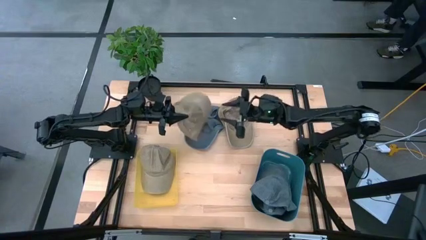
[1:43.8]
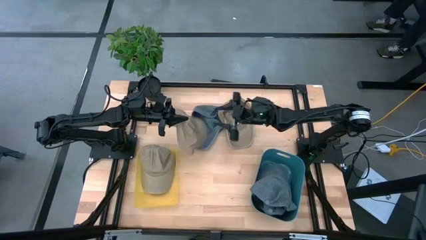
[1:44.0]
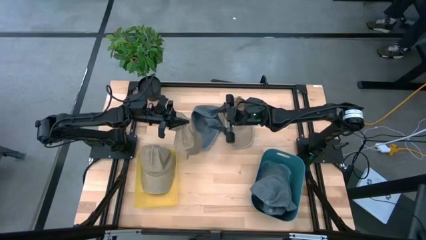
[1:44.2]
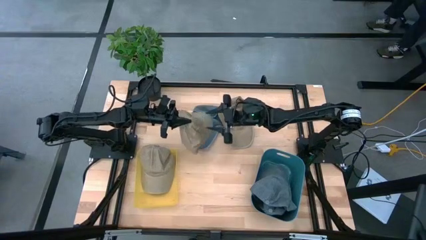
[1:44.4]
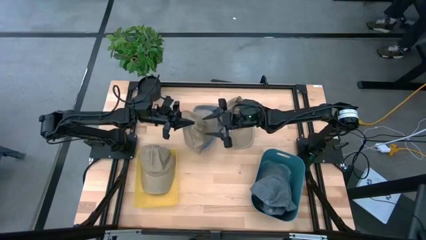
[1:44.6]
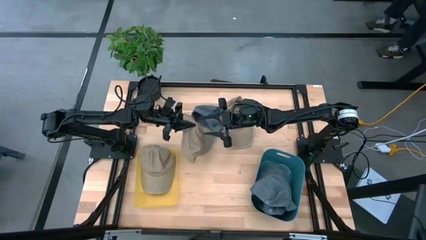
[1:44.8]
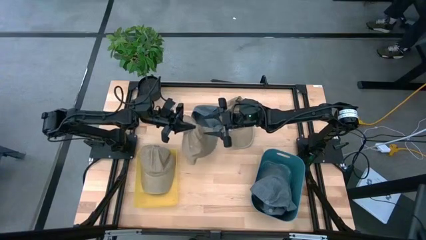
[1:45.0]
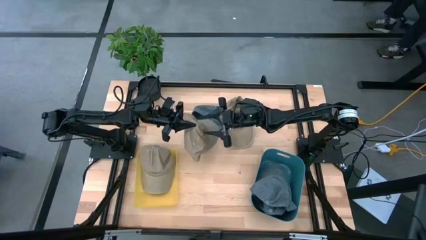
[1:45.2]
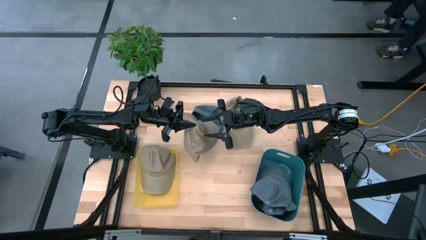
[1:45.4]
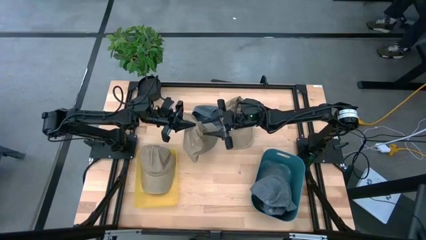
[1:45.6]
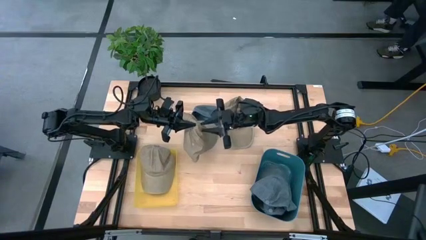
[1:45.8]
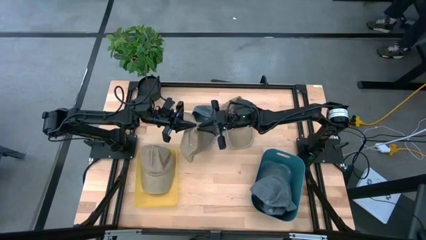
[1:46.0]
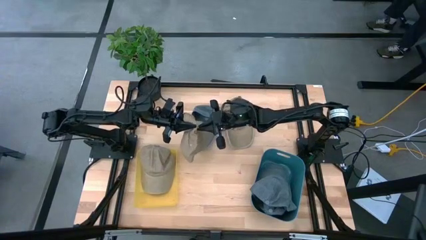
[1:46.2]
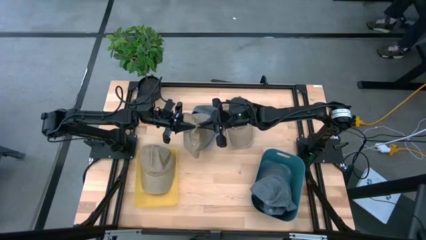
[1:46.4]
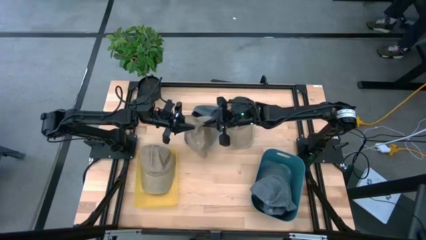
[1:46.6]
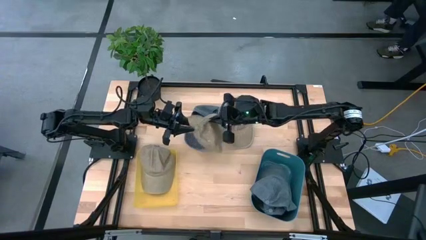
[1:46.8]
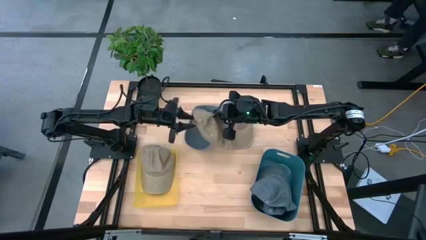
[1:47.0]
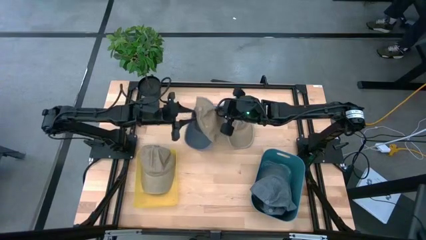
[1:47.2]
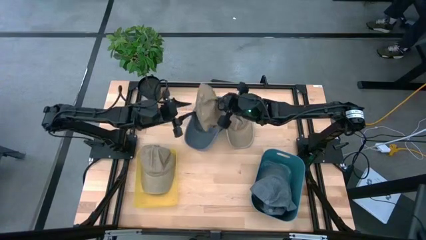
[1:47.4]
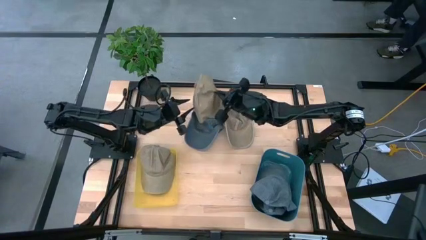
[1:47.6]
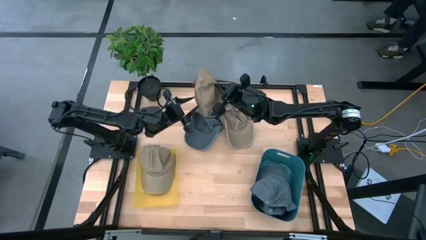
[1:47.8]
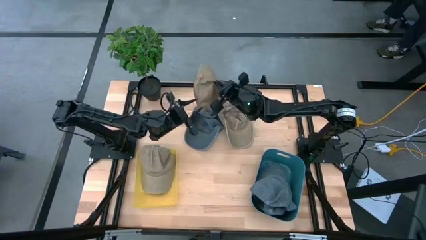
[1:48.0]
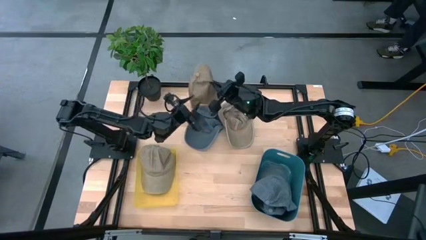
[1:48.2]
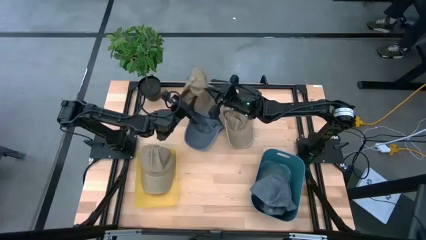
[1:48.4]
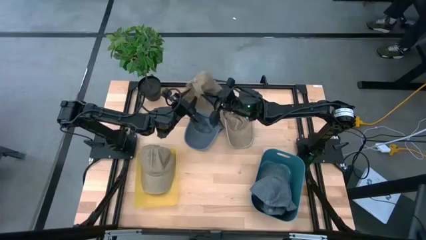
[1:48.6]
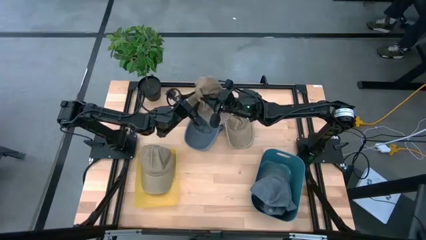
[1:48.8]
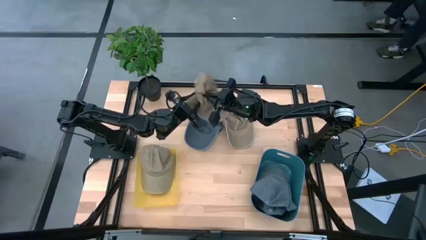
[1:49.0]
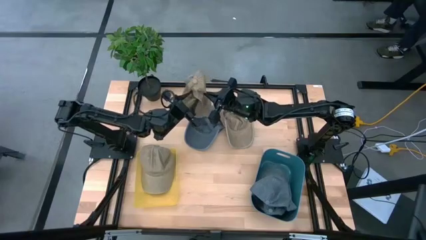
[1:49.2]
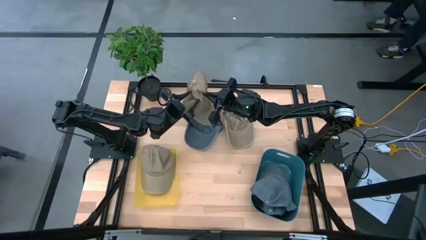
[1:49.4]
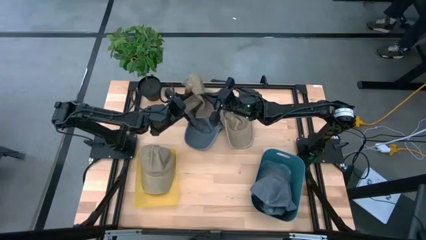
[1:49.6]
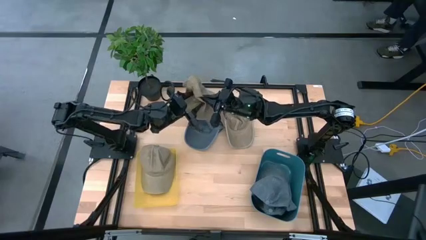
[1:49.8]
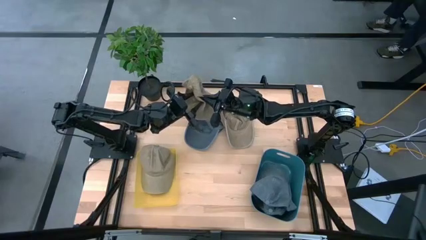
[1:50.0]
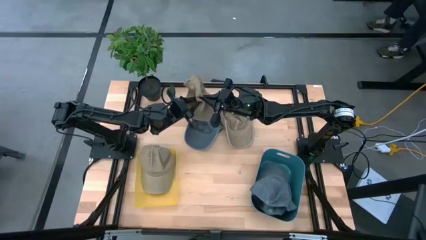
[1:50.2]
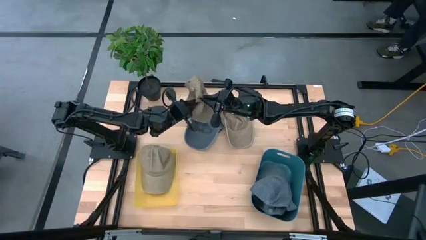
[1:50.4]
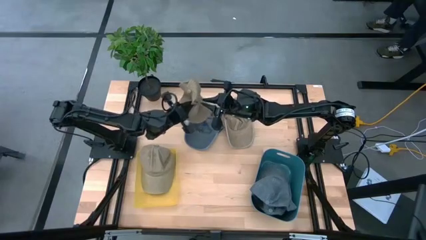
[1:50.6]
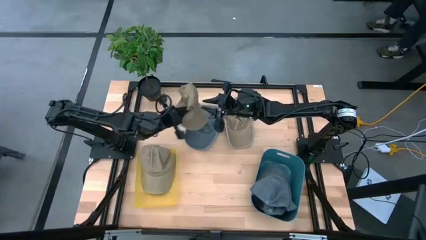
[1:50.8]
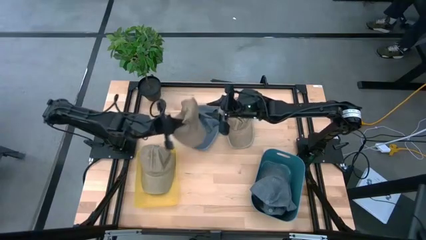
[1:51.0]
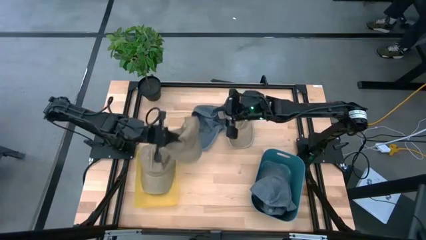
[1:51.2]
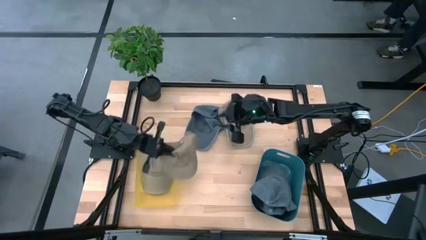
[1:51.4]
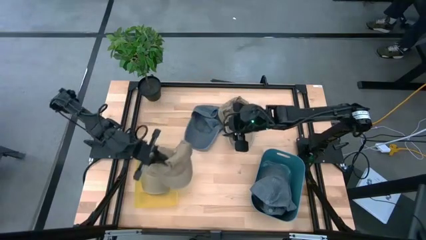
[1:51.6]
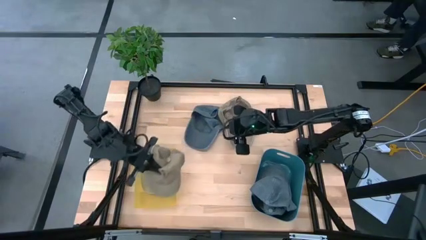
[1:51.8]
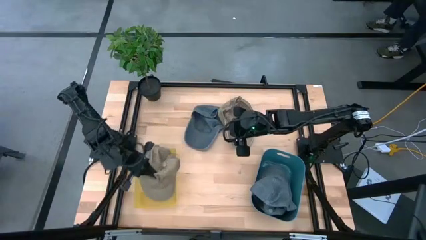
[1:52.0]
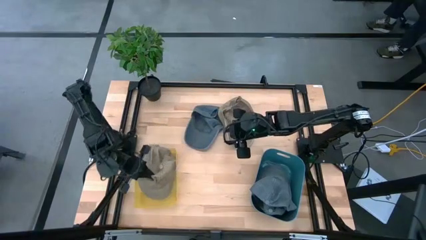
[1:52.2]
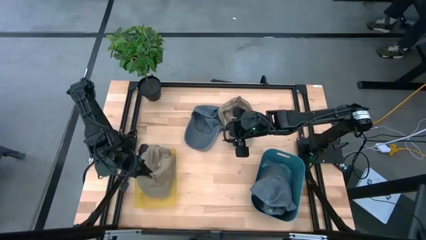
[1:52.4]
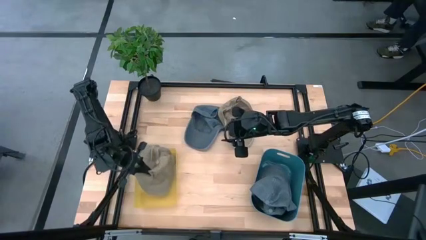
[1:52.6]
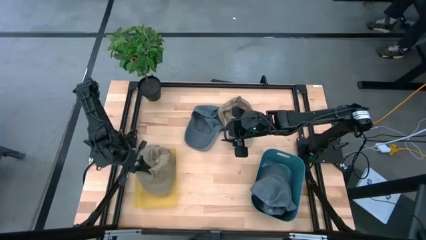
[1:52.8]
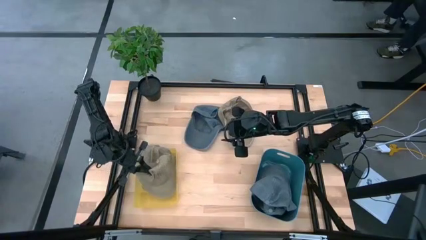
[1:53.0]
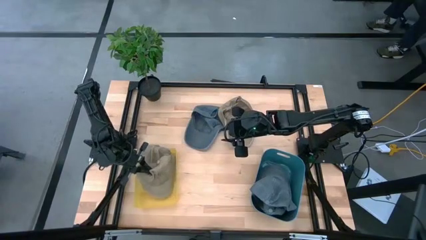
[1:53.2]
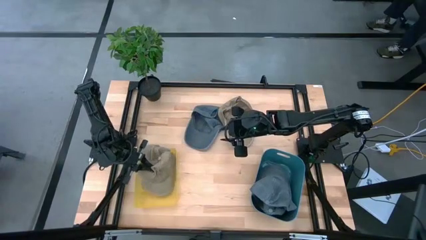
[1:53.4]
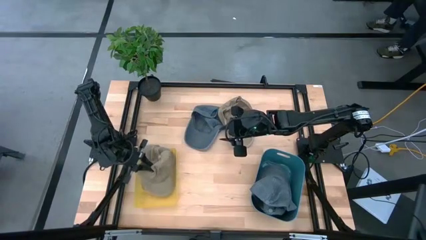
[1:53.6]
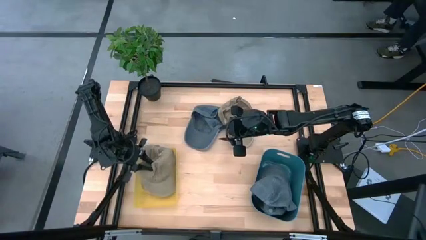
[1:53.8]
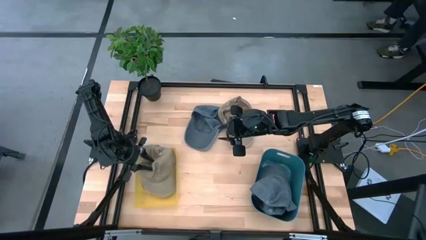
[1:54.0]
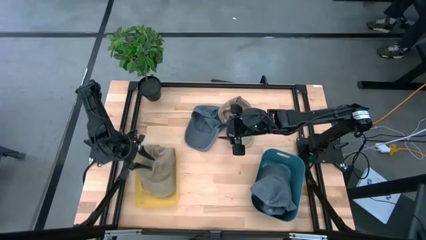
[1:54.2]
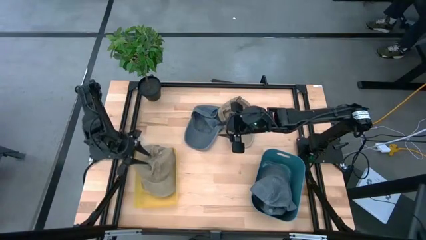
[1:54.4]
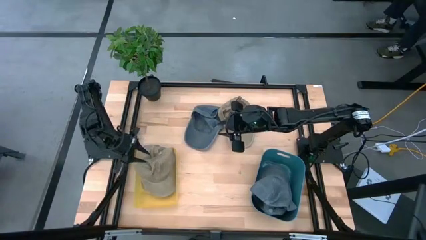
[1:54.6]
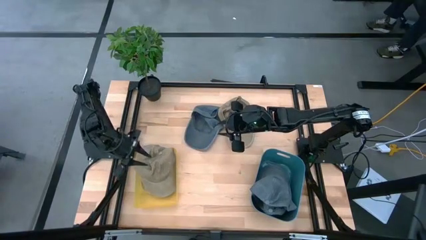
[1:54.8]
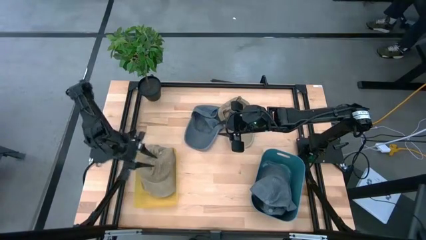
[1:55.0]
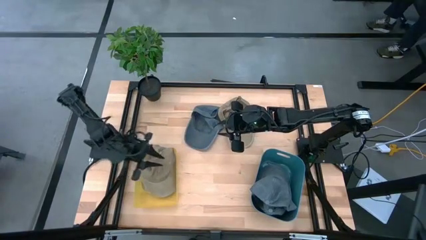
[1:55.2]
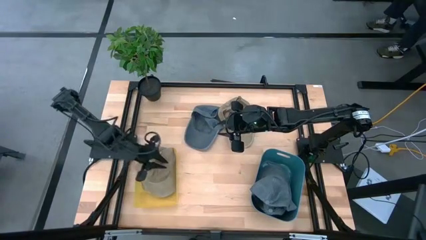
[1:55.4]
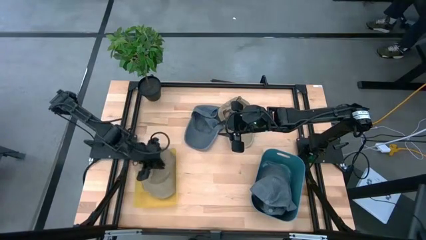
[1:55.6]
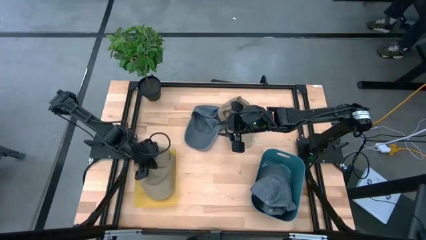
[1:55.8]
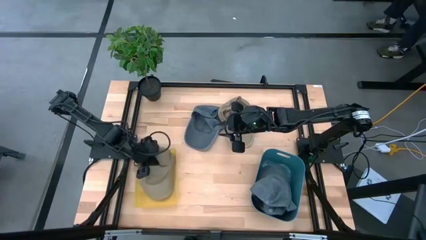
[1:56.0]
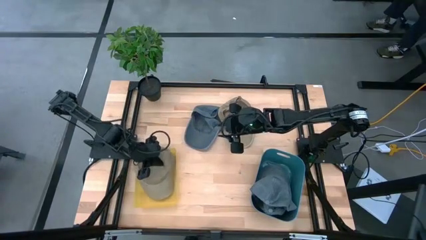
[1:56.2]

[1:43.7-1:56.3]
Task: Pick & Place hat
Put the left brown cap into the yellow bin

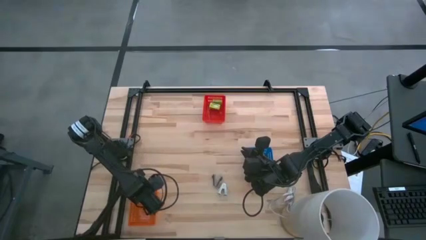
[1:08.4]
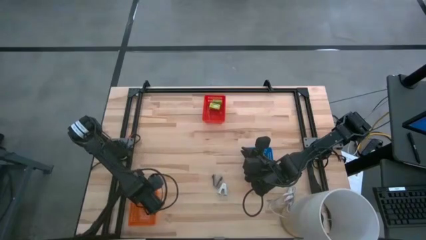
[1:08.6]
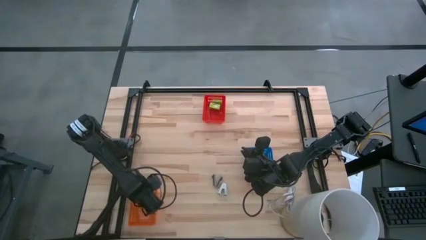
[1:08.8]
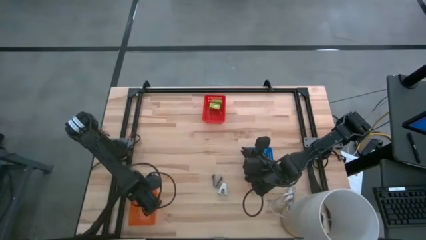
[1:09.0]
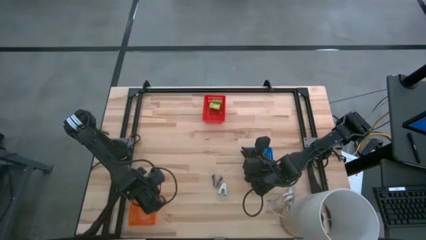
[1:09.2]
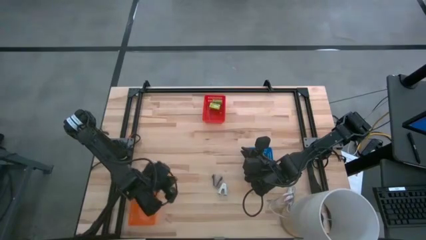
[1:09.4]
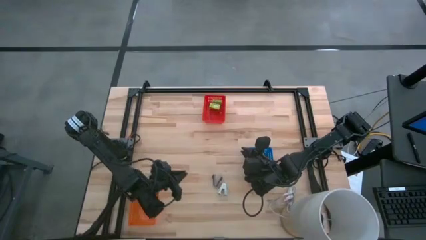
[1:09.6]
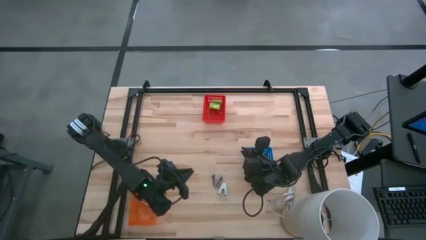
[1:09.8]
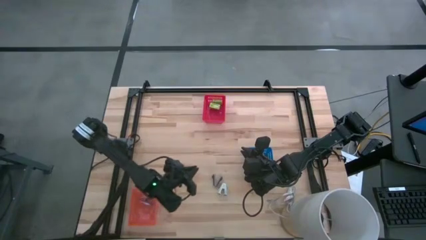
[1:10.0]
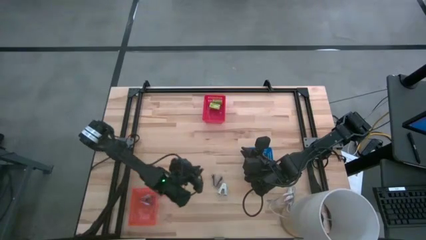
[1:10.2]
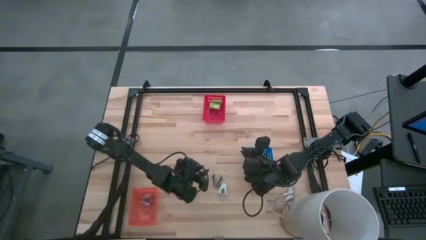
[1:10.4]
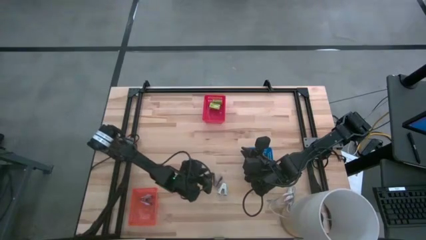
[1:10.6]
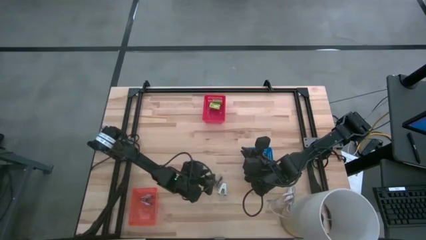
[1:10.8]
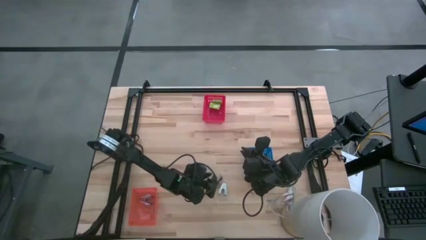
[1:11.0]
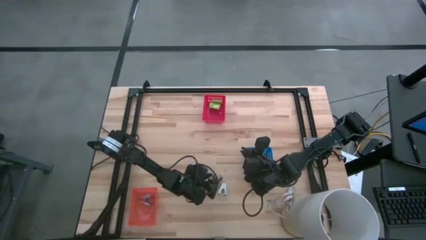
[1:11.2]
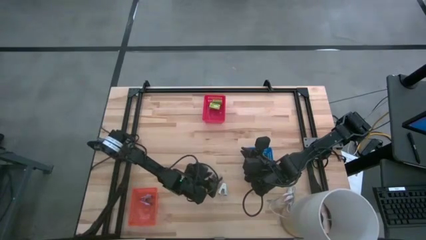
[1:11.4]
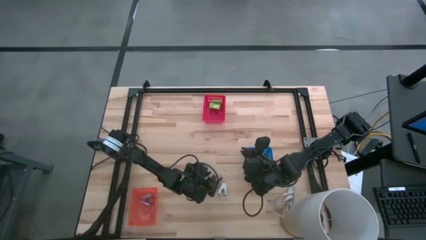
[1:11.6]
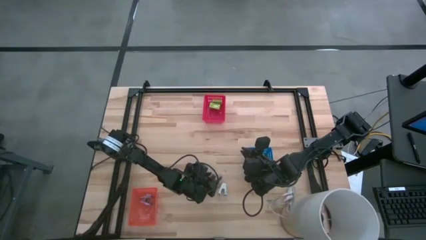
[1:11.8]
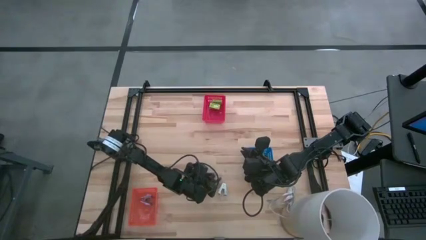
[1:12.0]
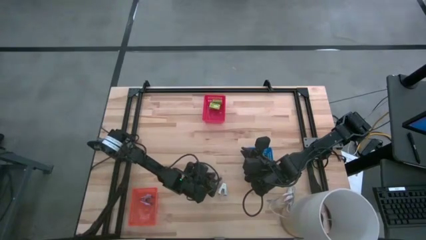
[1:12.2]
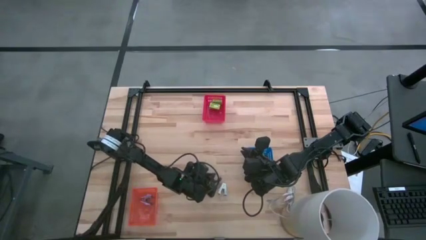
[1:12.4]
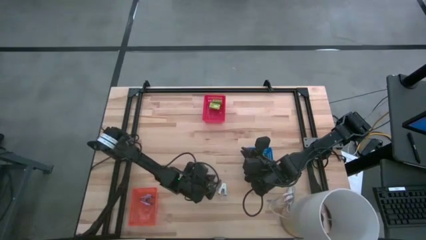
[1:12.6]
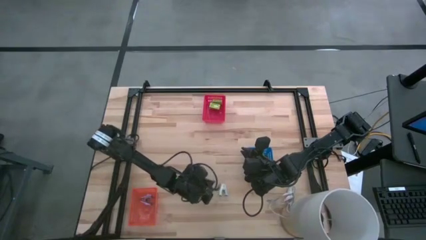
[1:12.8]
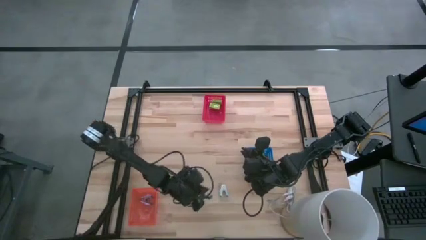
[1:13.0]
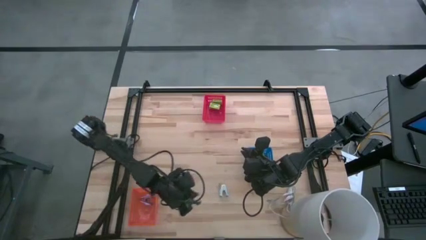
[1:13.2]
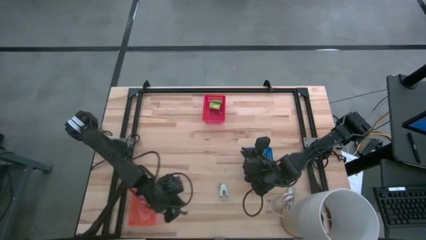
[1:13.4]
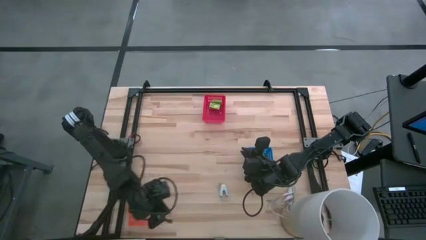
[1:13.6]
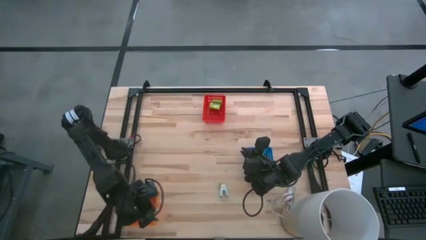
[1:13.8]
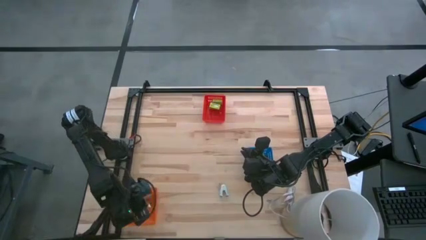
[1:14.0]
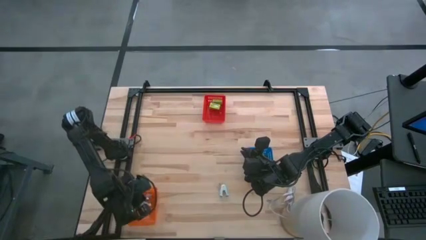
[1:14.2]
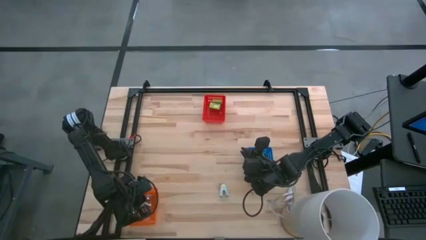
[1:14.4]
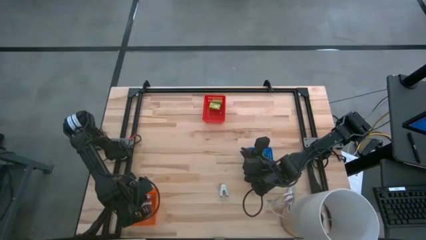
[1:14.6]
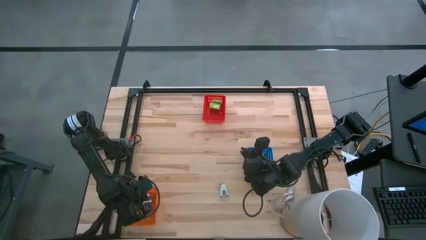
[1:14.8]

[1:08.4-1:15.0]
Task: Pick and place Stapler, Stapler remover, tape
Put the black staple remover into the orange bin
